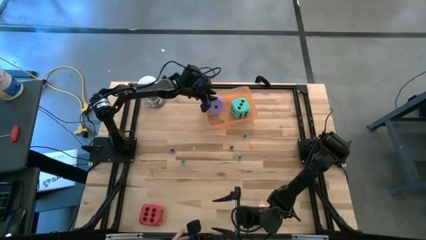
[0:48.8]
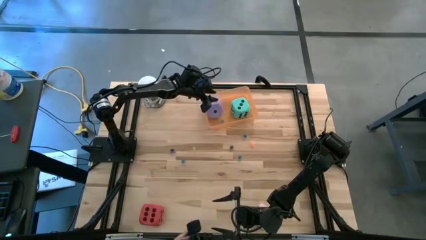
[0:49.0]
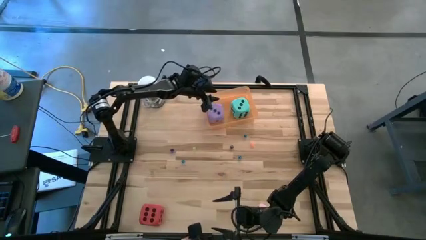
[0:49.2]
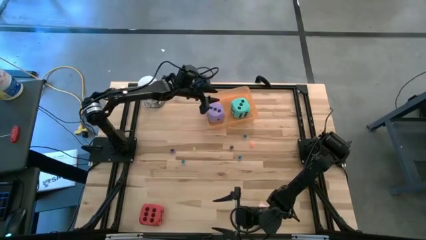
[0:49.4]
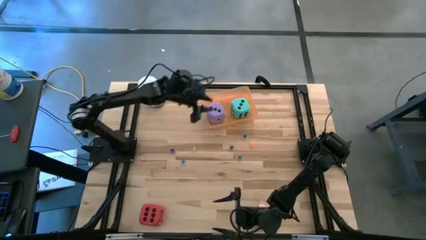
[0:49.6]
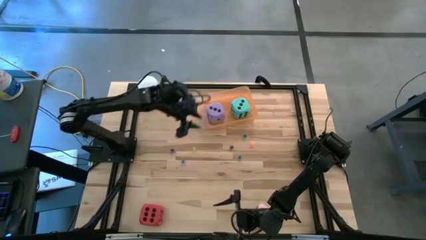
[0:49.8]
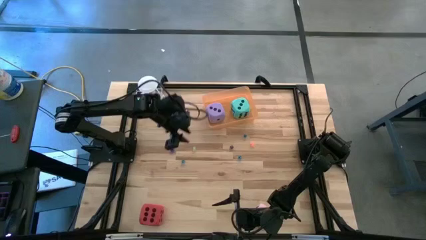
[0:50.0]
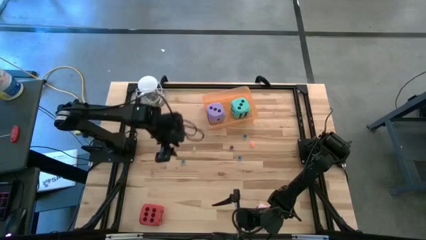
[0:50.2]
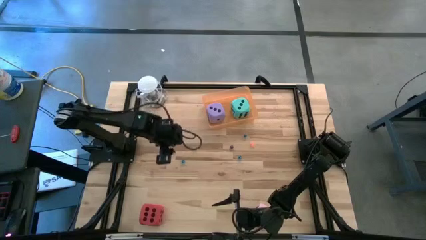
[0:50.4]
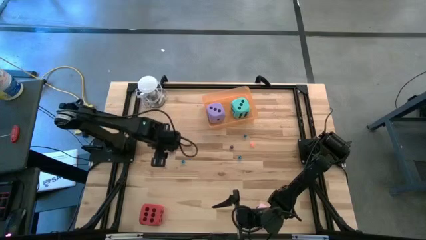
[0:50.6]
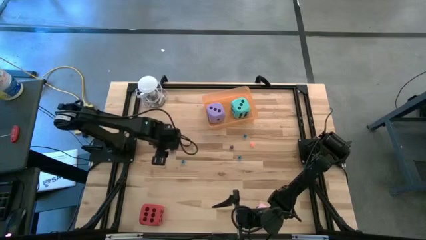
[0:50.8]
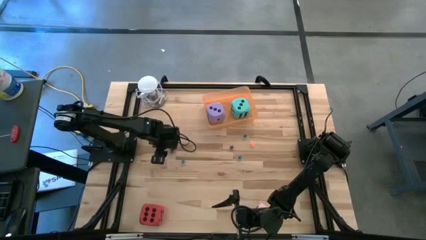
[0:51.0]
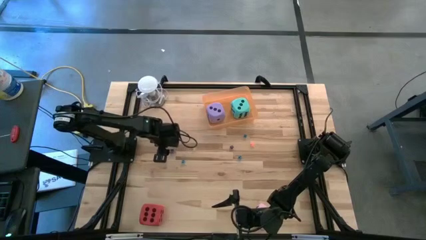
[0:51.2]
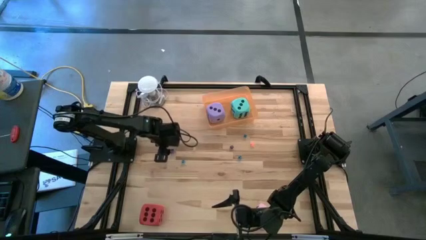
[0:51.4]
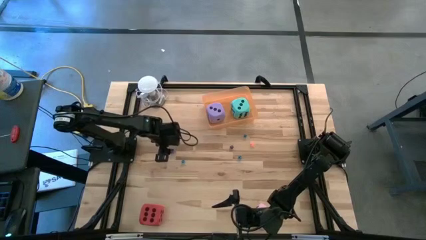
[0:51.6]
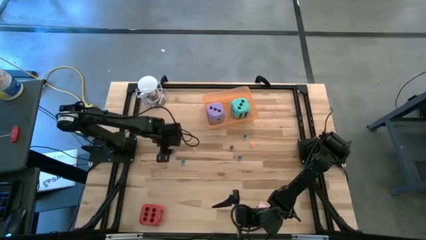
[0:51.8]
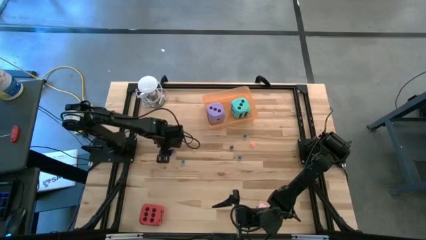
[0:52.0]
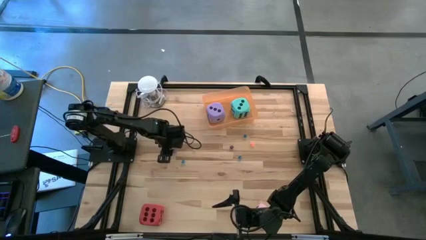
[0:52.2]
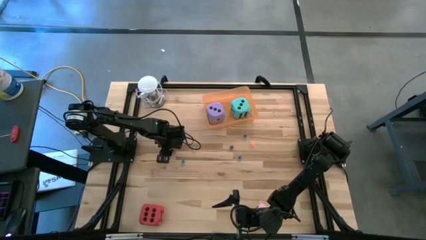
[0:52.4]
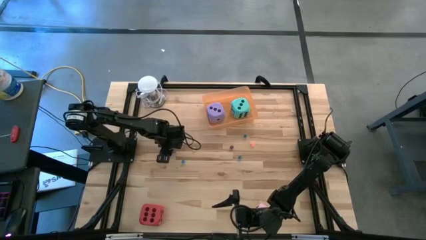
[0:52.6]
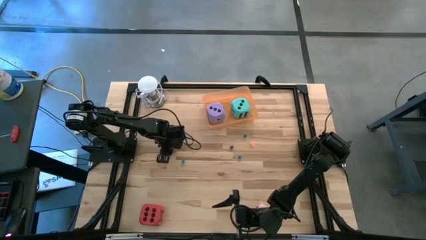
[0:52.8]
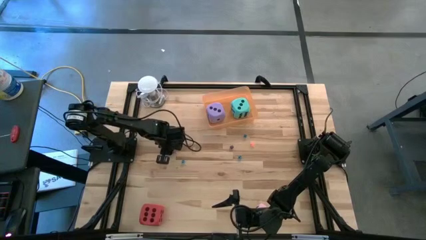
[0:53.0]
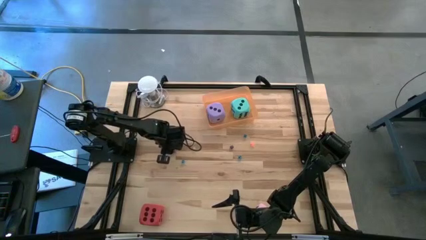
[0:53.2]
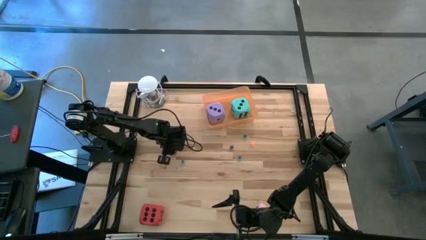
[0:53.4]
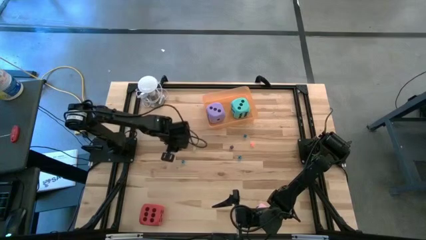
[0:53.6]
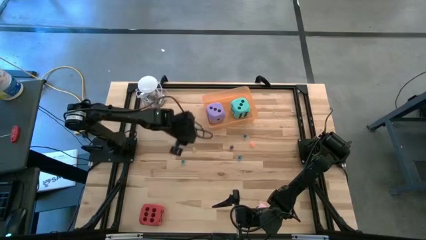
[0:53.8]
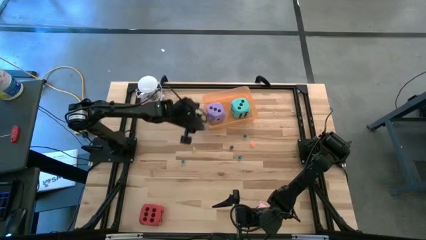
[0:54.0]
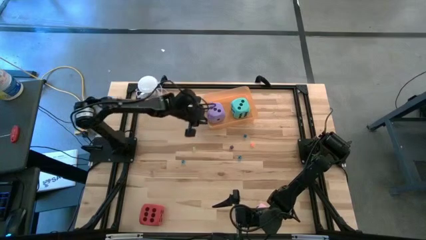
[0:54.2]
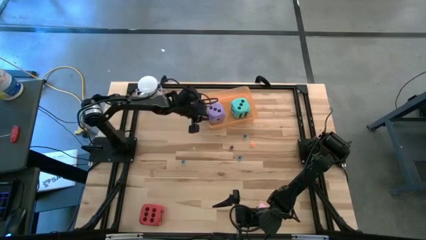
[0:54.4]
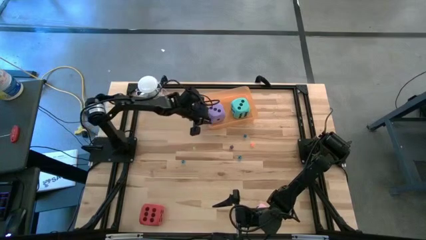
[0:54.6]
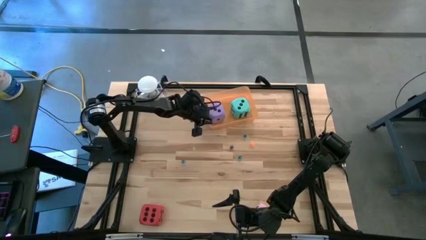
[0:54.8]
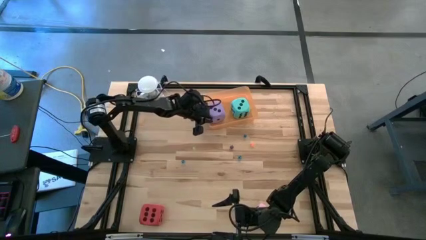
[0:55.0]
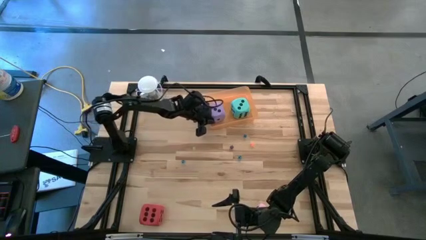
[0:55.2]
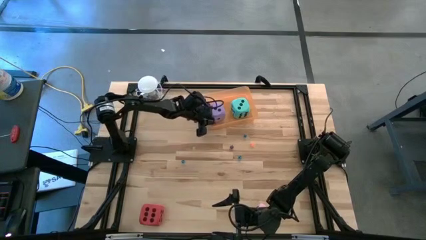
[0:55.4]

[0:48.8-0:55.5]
Task: Pick & Place Dice
Put the small blue die into the orange bin

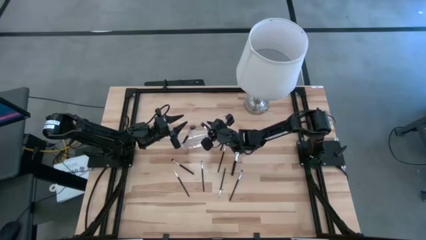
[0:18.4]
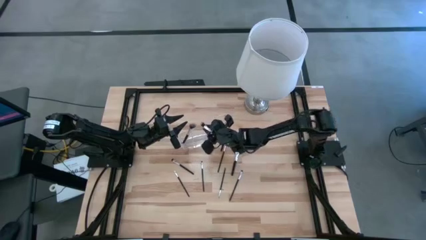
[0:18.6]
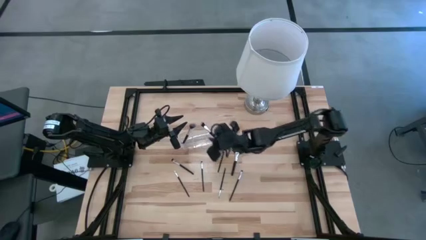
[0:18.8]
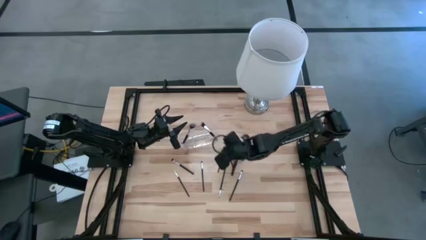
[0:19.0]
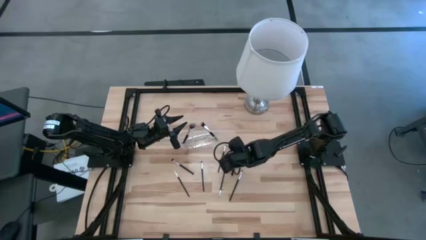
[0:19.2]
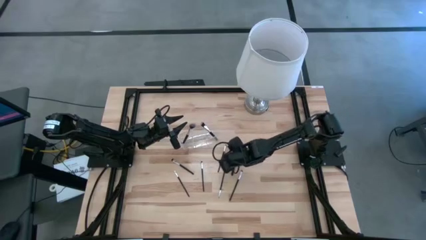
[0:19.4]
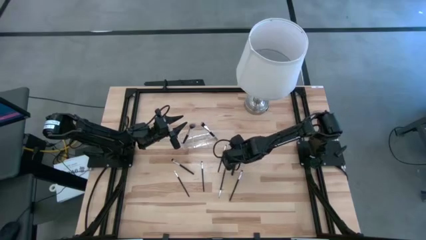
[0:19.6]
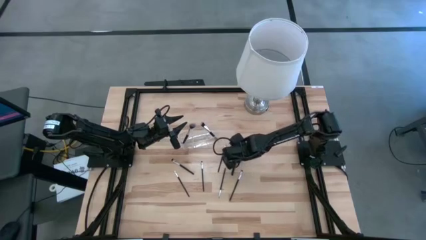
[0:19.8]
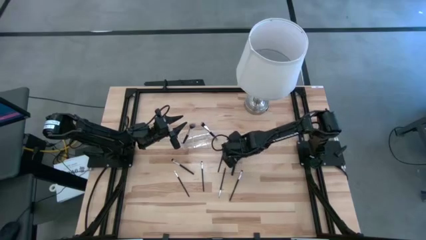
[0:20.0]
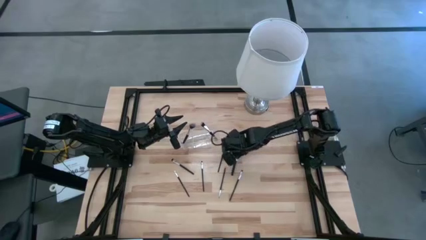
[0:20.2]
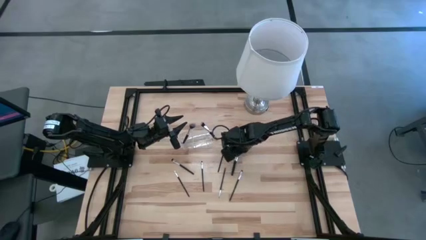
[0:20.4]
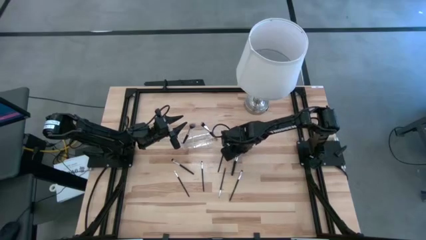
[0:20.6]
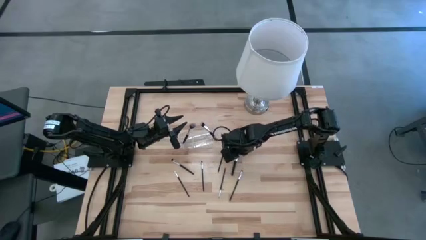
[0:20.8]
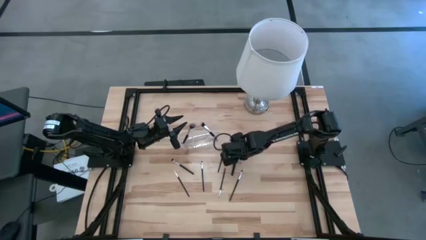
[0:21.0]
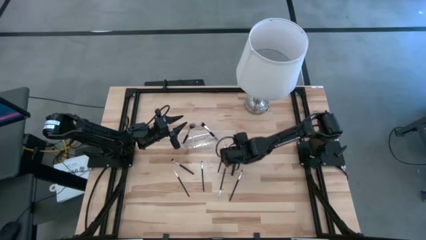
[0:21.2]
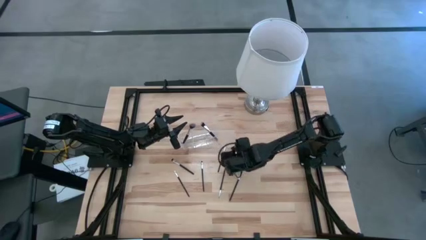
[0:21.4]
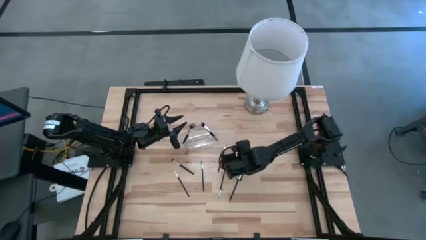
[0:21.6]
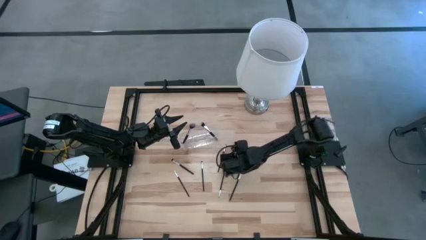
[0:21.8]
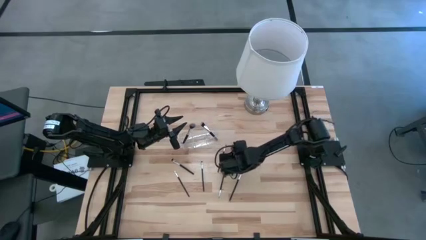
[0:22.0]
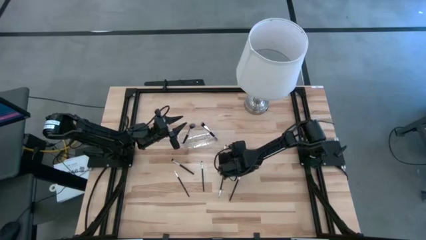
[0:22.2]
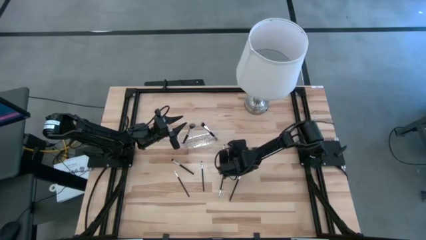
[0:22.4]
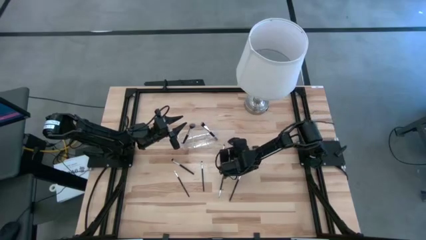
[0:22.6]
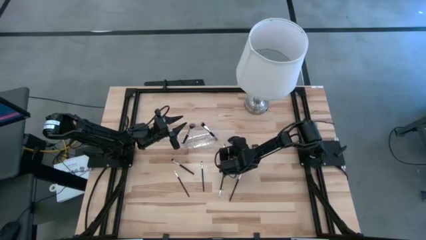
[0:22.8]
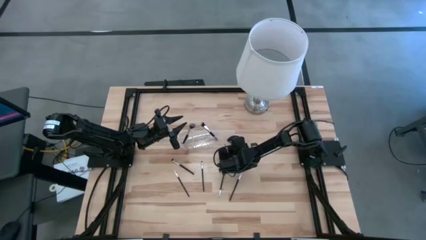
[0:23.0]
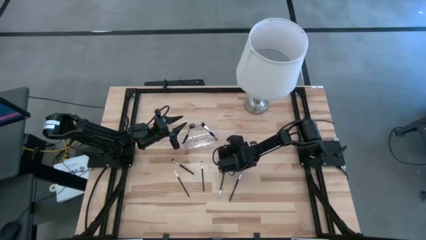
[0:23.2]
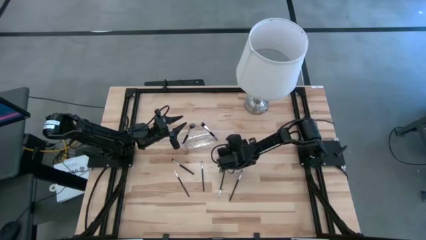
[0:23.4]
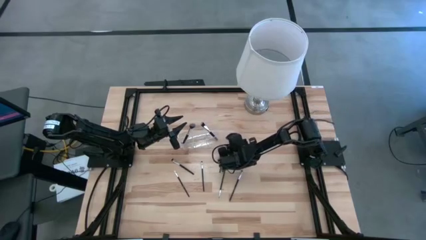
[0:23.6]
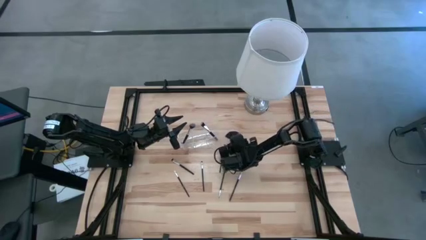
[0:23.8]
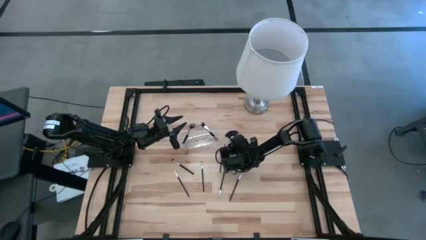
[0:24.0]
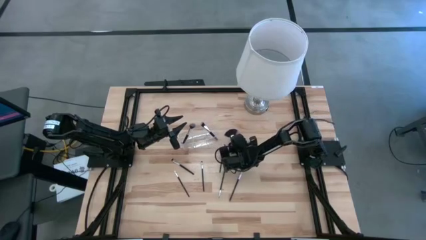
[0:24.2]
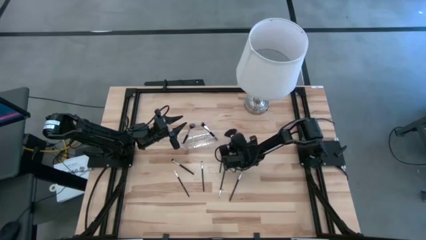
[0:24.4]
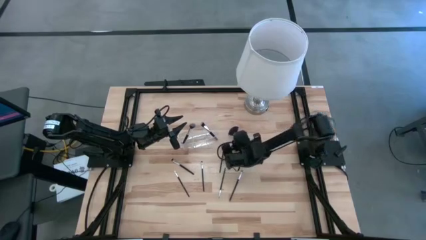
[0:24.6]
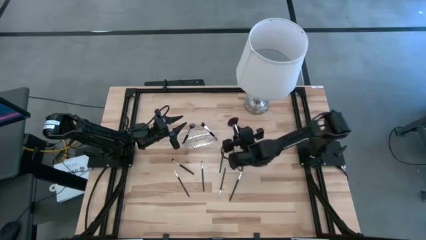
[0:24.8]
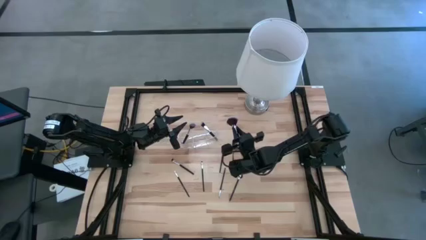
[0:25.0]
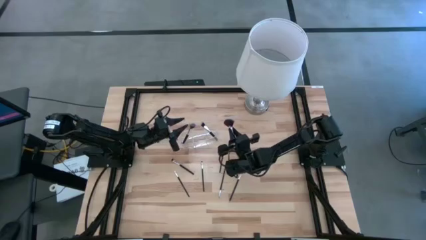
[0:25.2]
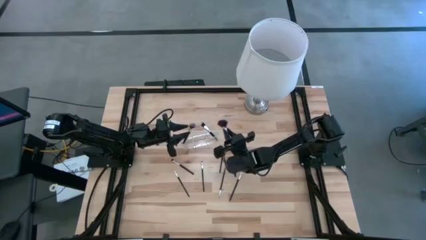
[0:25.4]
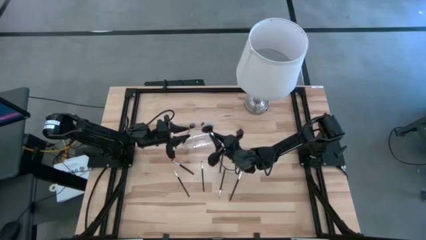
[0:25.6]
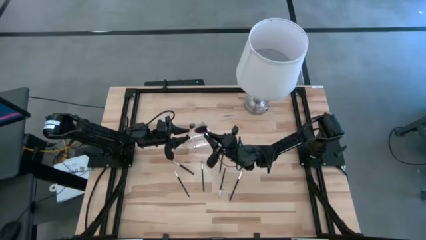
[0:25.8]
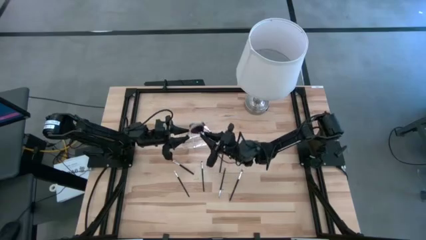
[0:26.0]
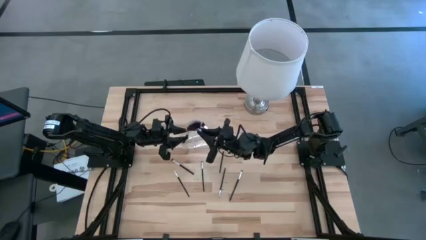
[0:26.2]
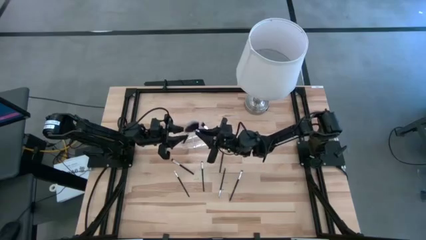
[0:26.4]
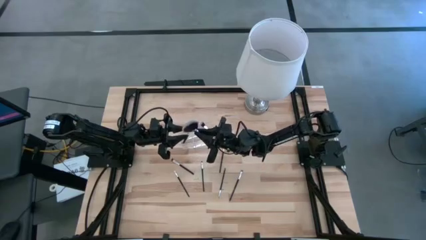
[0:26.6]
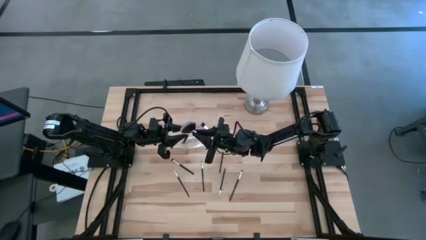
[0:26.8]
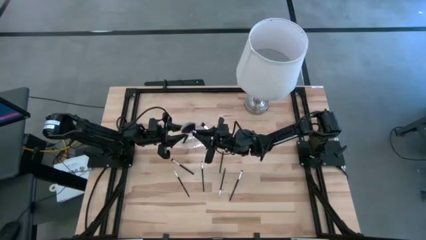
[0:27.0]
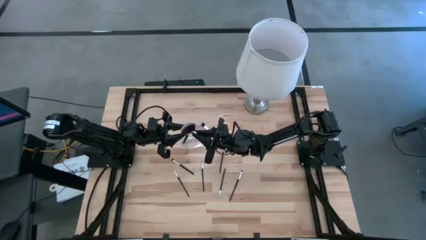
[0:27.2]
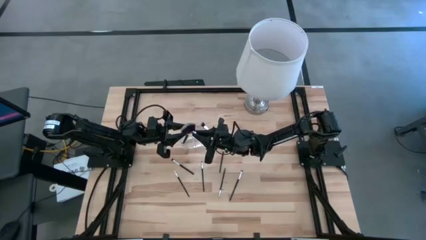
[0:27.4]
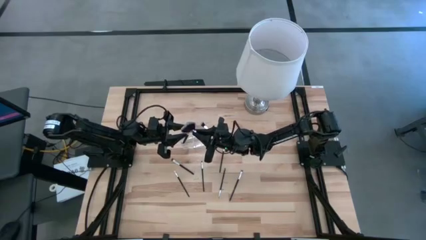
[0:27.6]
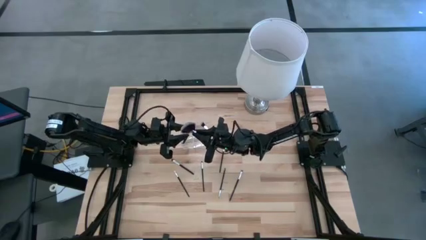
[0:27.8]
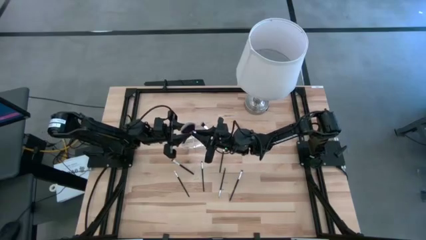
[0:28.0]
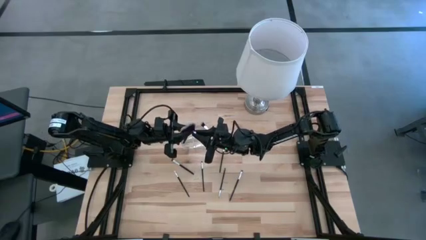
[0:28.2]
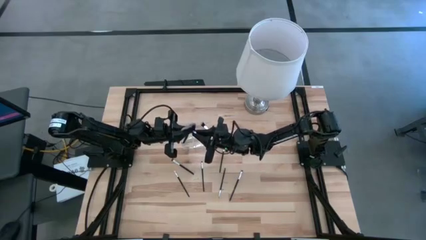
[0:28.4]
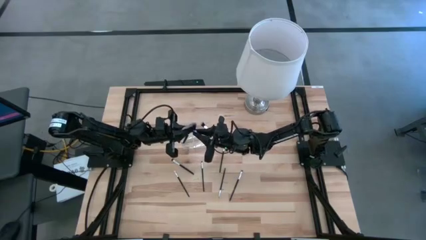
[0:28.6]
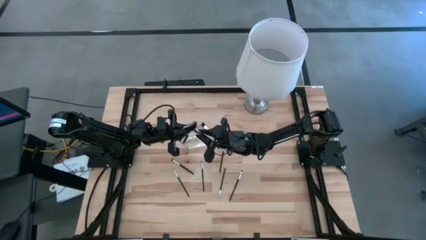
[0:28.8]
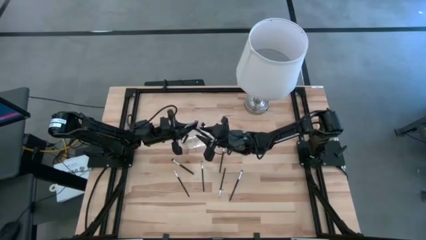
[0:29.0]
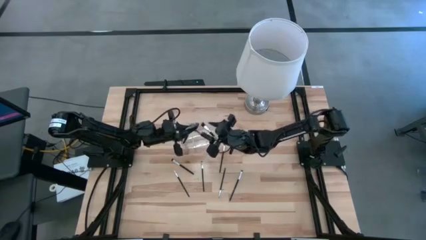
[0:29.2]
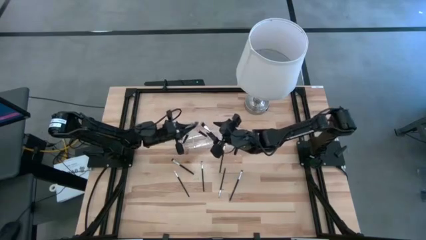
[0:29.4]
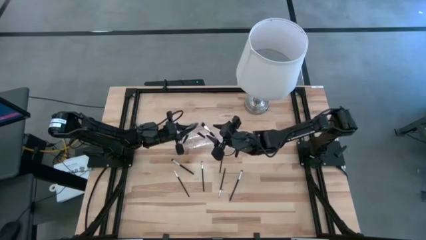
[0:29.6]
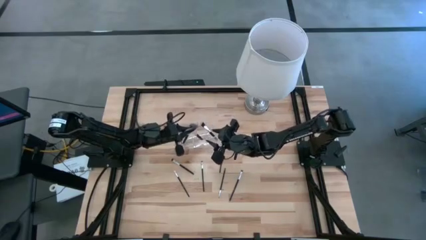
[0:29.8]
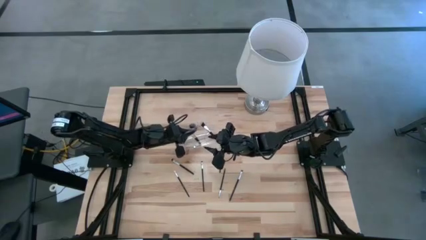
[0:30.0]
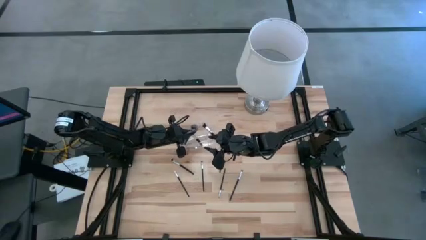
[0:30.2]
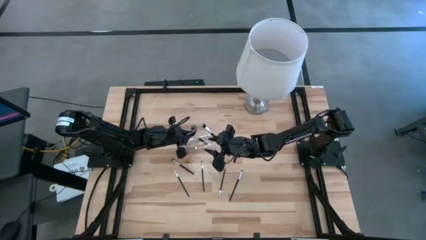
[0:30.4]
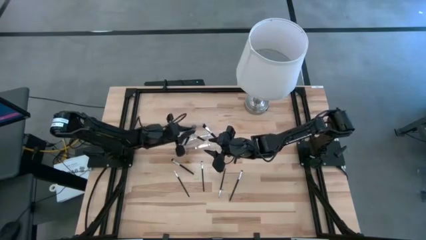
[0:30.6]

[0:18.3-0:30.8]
Task: Put items in baskets/containers
Put the highlighter brush into the center transparent organizer
